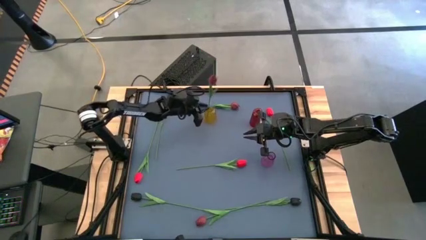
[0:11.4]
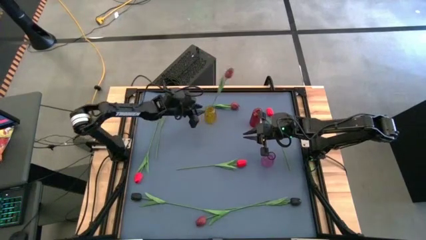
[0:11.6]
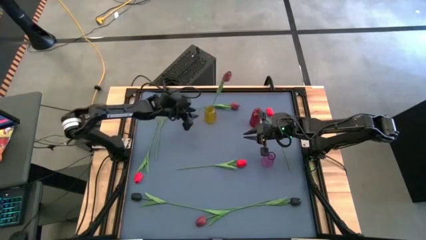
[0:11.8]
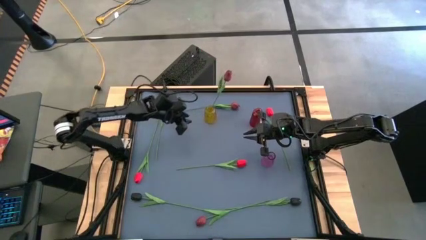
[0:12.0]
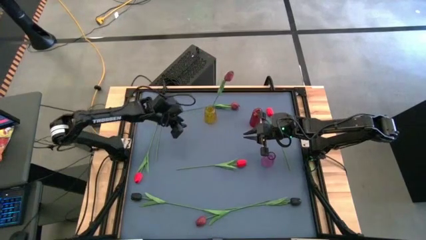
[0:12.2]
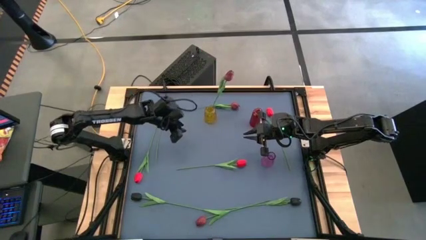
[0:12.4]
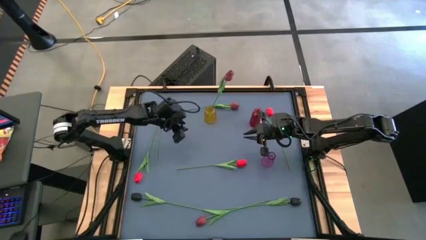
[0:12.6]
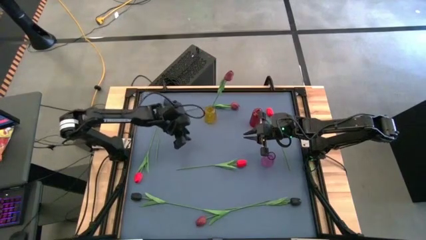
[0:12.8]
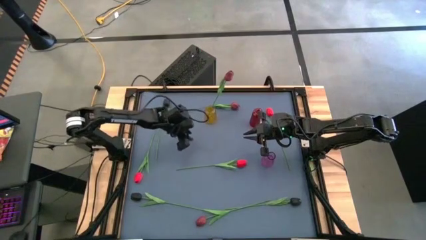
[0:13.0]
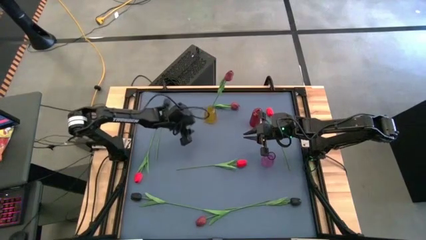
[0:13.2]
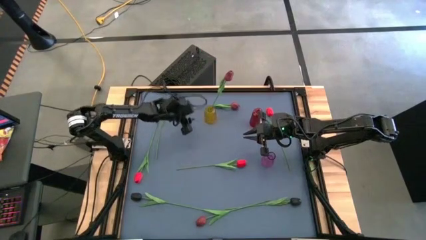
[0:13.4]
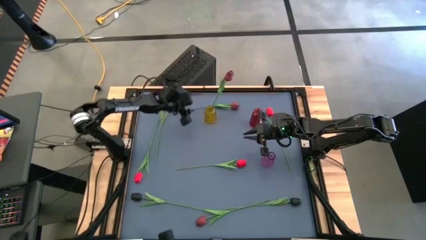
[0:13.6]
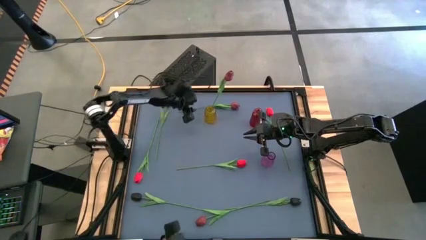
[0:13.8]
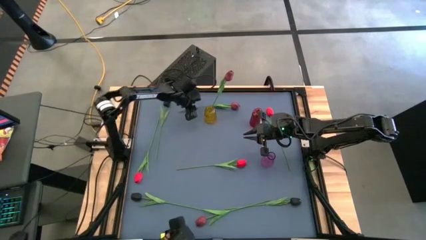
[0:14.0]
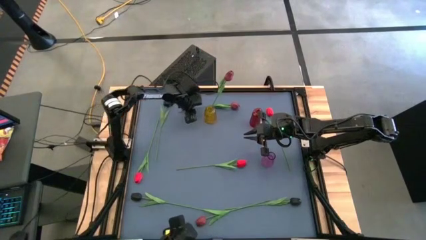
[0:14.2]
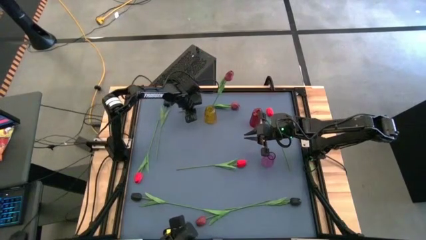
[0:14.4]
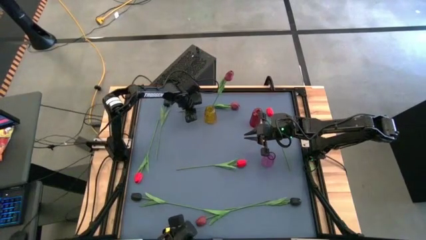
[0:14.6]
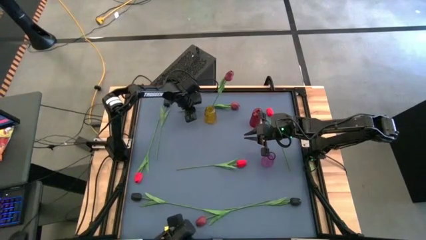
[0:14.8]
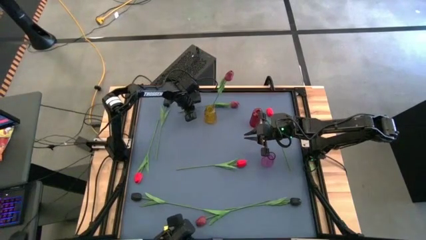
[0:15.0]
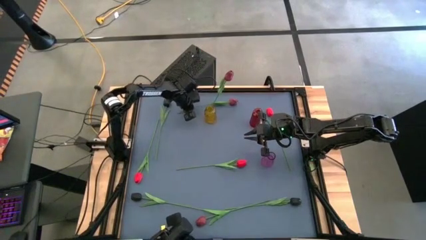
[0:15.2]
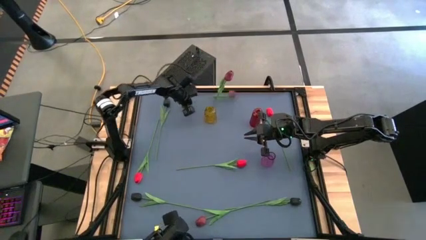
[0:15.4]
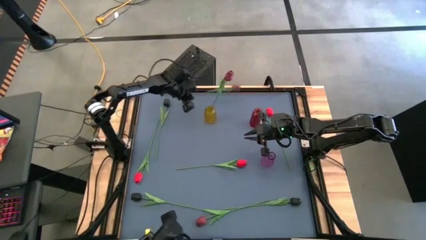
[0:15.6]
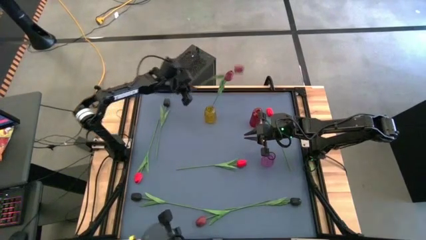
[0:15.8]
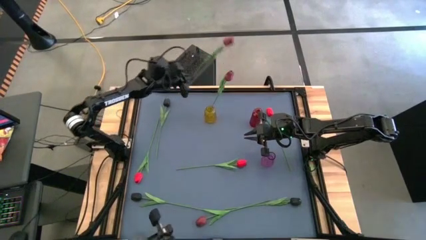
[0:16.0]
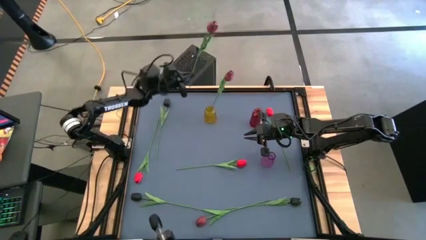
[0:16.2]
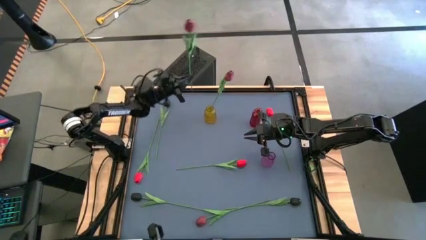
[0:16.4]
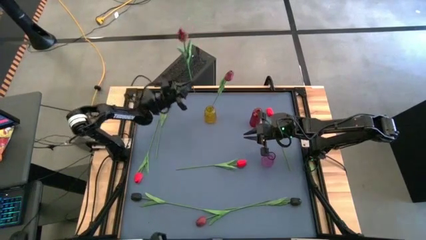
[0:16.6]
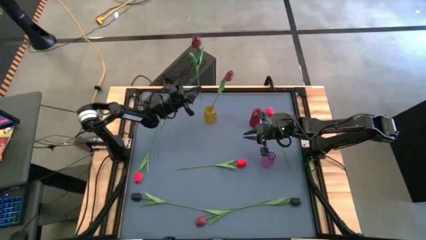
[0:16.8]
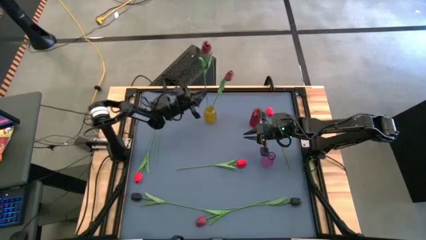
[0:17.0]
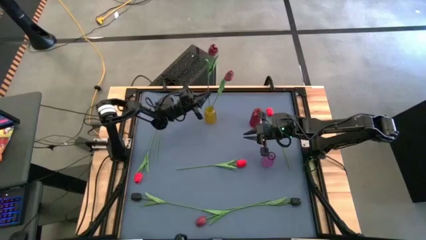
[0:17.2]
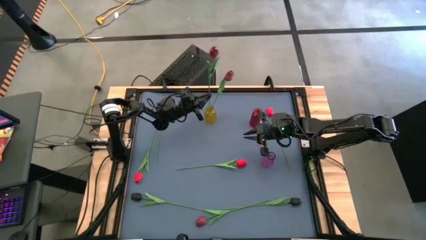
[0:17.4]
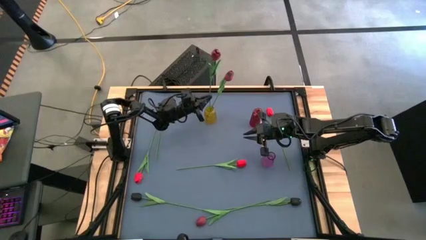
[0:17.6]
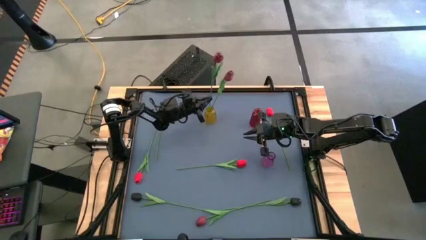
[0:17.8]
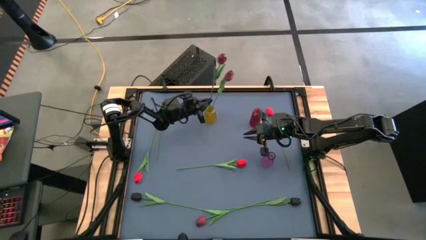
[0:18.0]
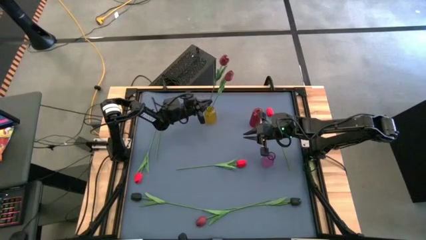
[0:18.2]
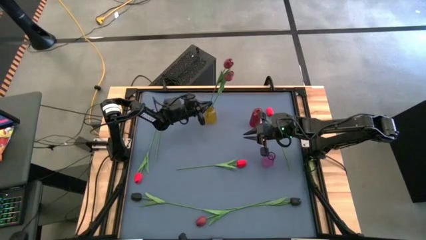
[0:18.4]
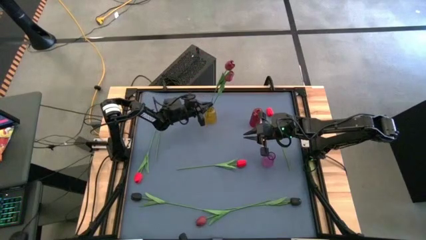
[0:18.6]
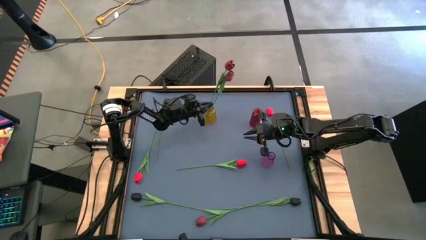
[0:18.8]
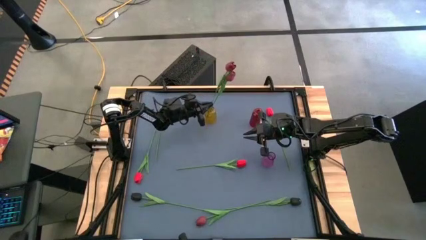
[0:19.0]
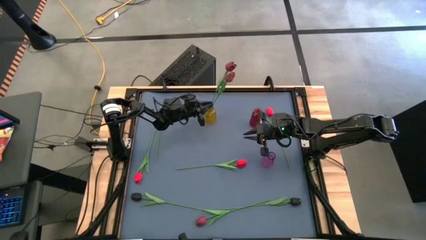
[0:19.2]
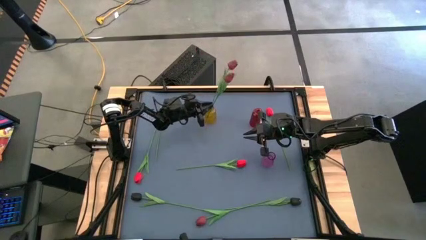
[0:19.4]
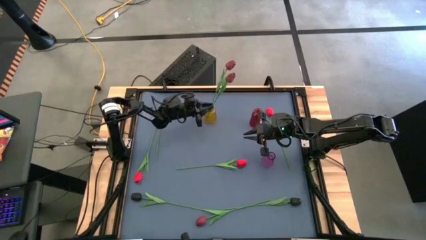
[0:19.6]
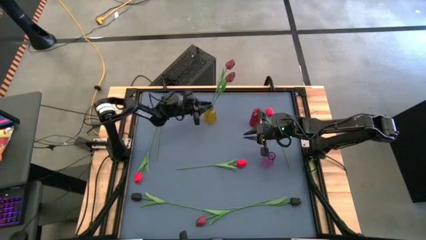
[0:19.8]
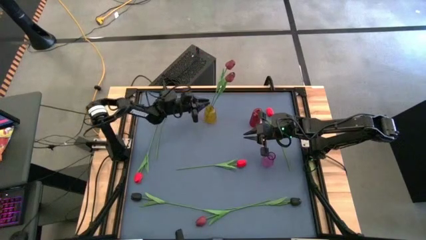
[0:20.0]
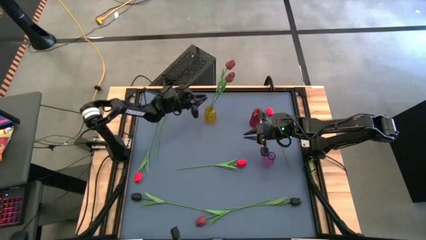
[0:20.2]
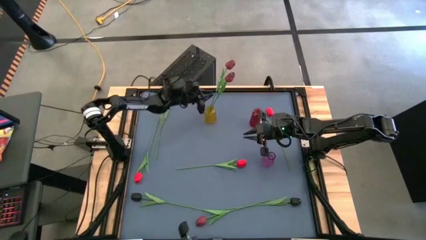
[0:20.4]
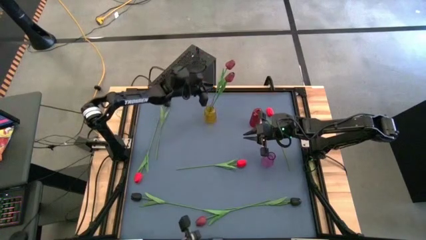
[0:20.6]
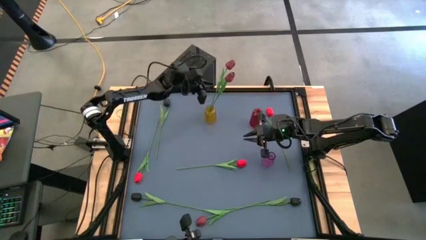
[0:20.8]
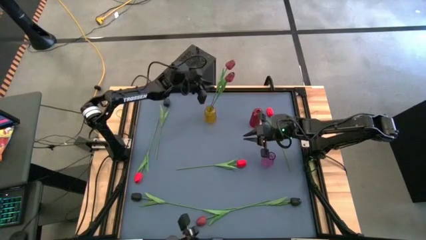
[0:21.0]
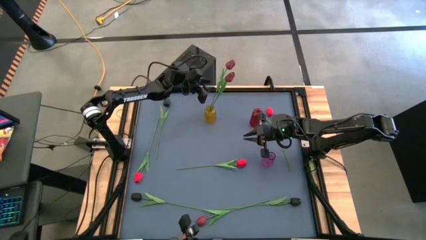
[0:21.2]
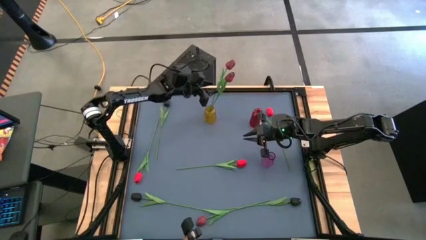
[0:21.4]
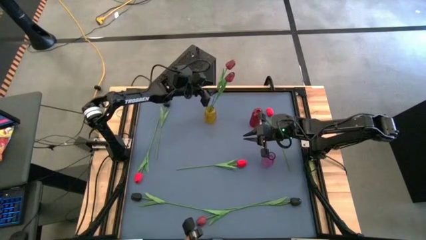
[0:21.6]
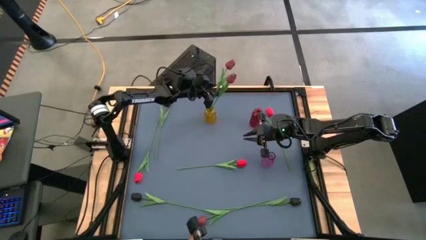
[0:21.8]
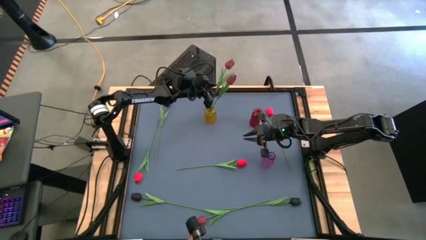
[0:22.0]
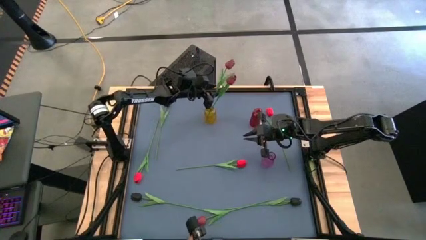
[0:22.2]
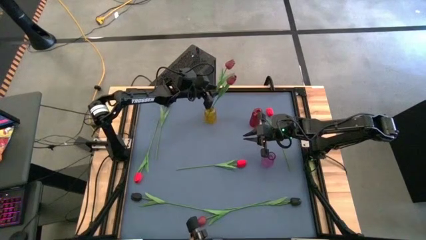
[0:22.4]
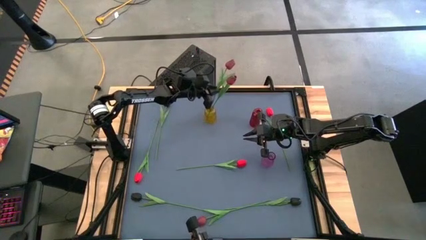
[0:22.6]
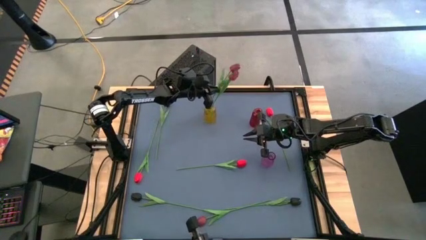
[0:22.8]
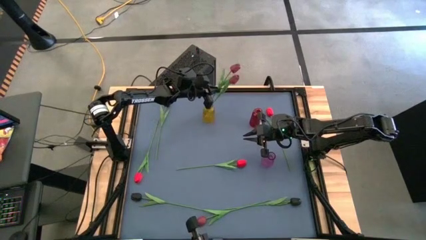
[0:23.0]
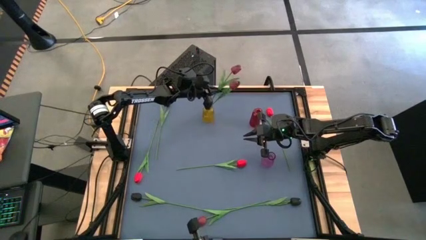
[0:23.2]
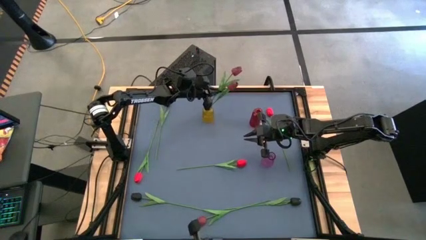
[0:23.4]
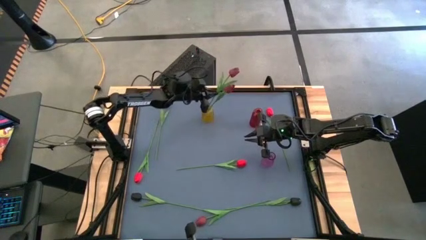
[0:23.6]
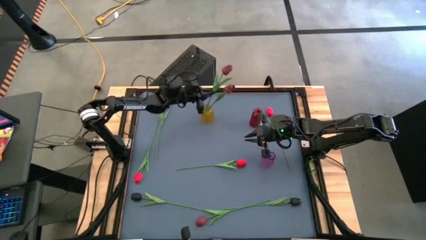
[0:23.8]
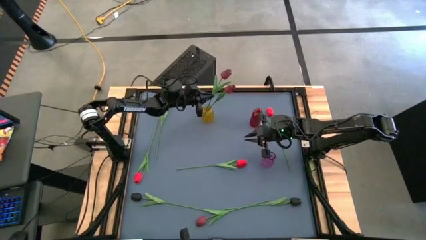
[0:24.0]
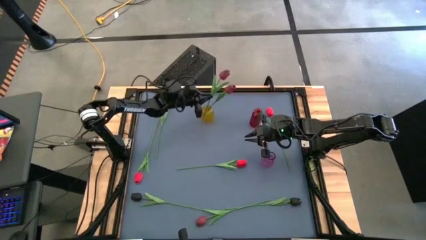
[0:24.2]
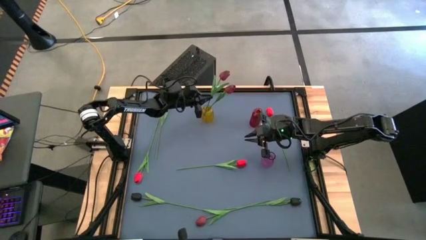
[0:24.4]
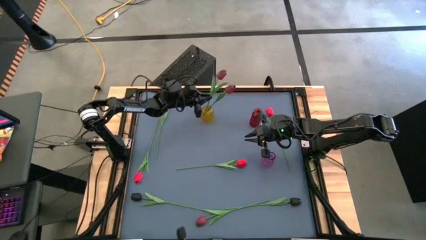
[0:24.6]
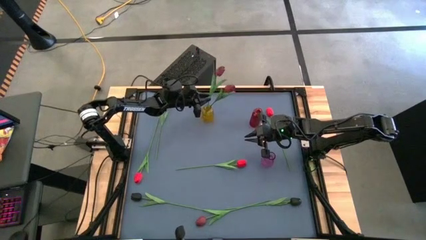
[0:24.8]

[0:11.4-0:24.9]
Task: Sort flowers into vase by color
Put the top pink flower into the yellow vase
